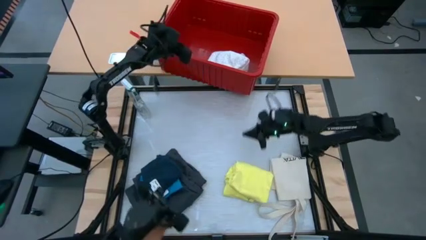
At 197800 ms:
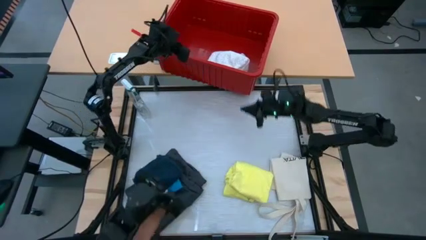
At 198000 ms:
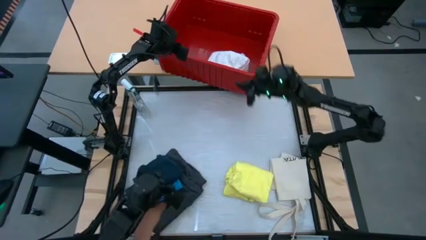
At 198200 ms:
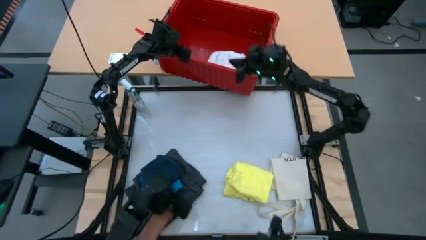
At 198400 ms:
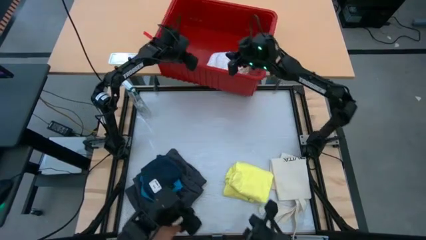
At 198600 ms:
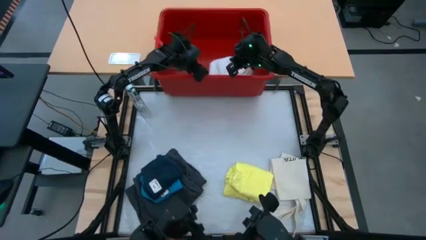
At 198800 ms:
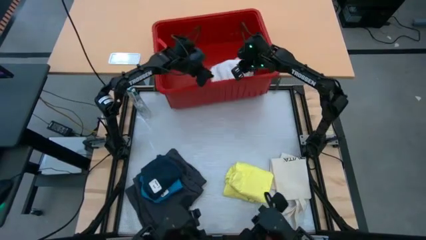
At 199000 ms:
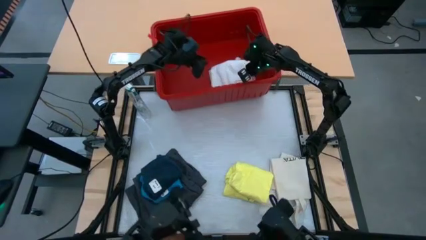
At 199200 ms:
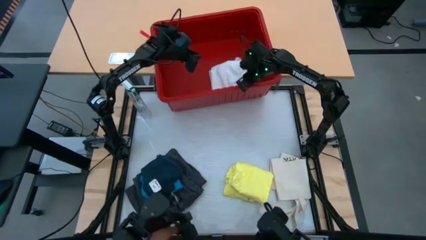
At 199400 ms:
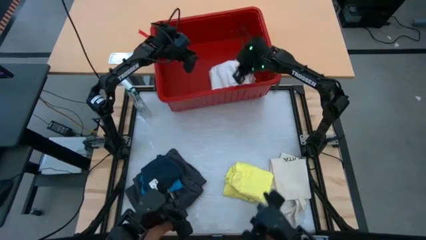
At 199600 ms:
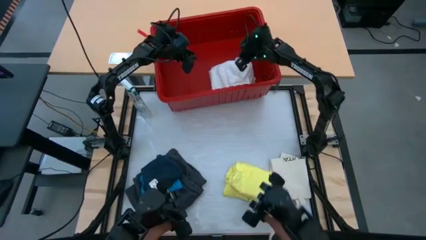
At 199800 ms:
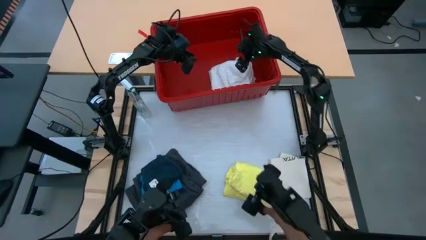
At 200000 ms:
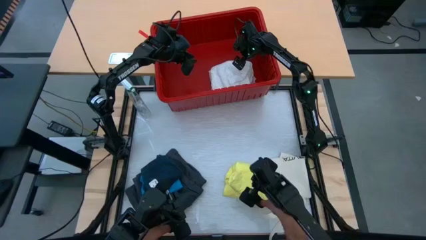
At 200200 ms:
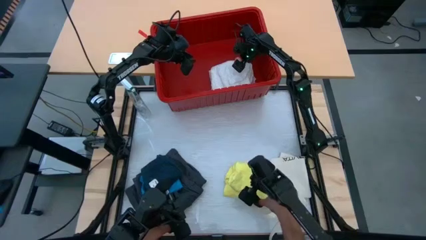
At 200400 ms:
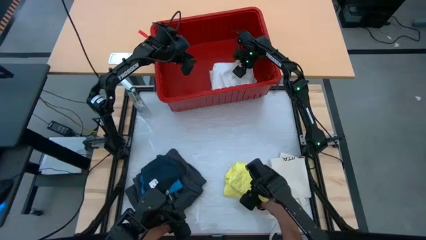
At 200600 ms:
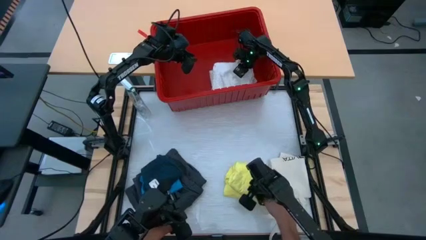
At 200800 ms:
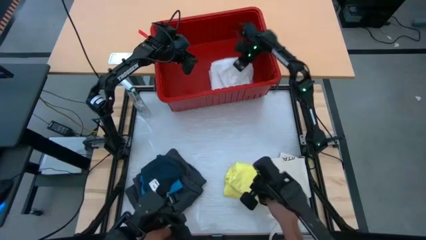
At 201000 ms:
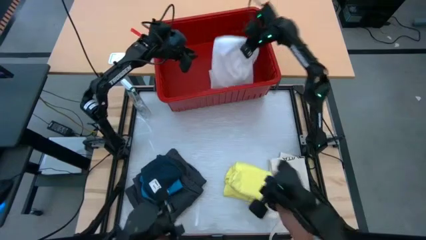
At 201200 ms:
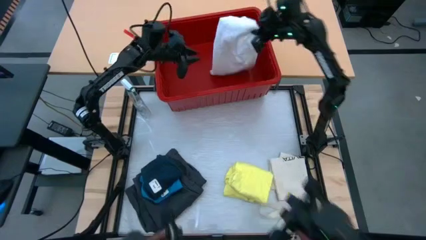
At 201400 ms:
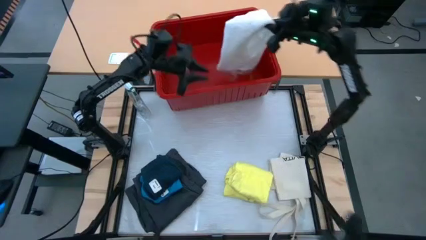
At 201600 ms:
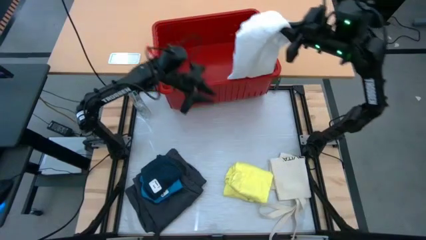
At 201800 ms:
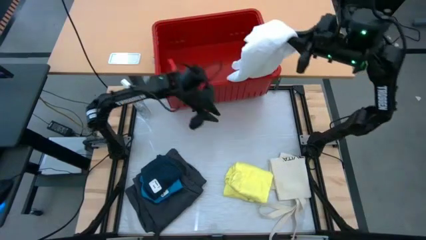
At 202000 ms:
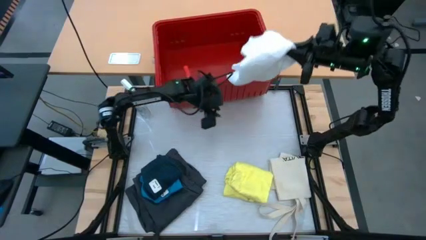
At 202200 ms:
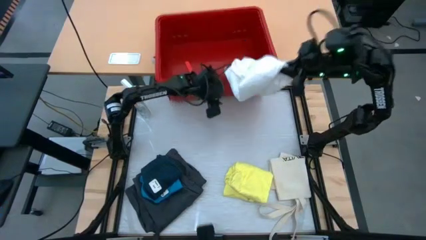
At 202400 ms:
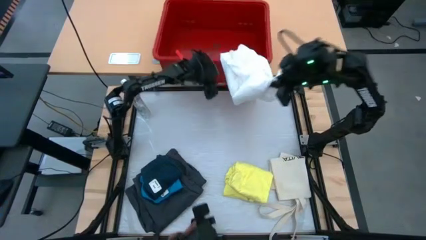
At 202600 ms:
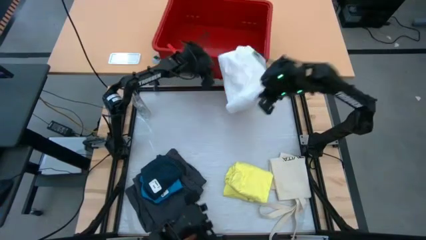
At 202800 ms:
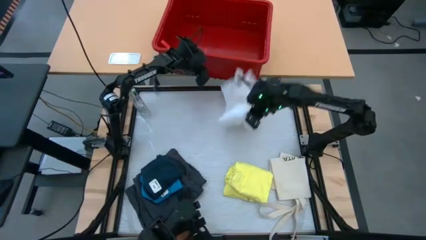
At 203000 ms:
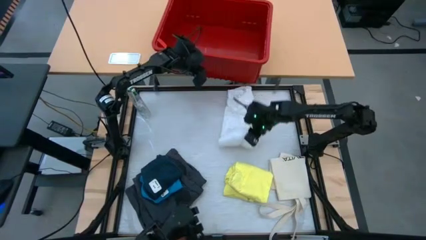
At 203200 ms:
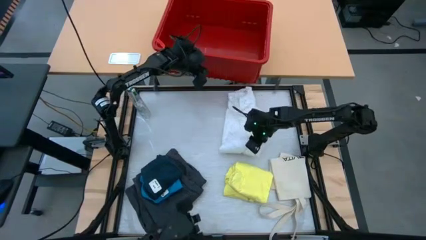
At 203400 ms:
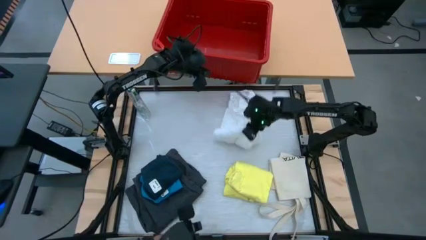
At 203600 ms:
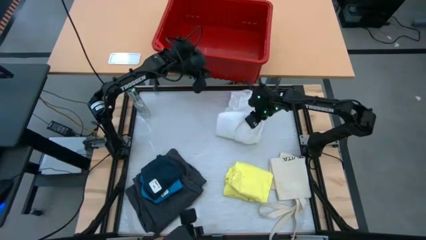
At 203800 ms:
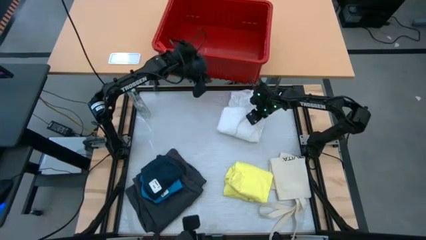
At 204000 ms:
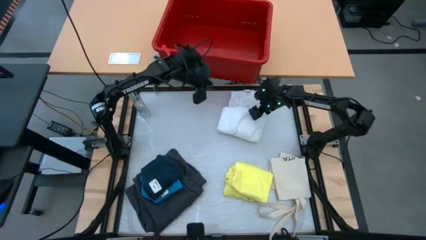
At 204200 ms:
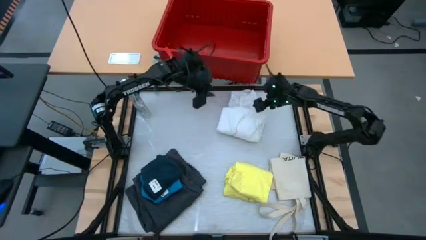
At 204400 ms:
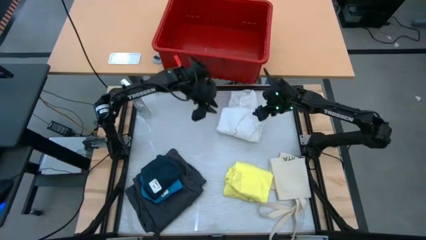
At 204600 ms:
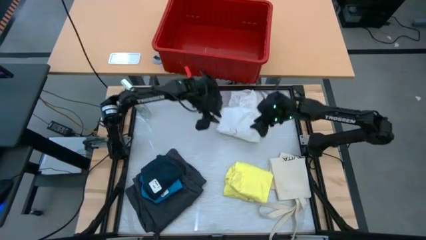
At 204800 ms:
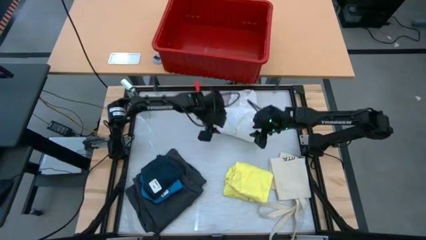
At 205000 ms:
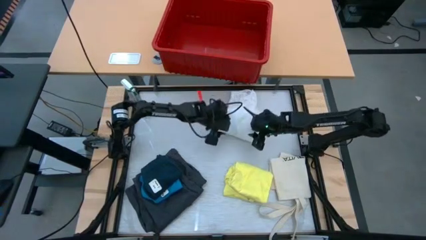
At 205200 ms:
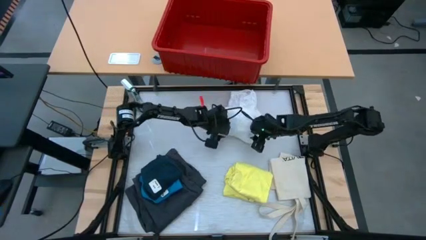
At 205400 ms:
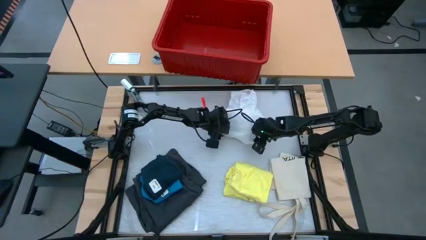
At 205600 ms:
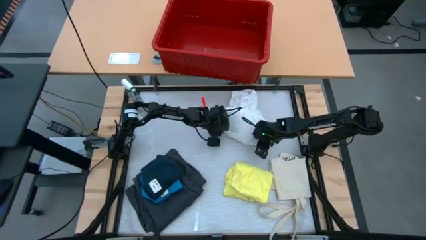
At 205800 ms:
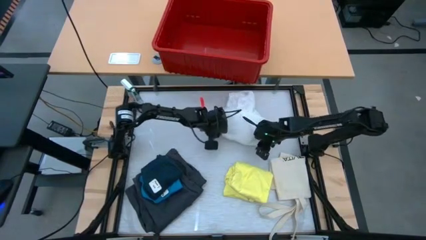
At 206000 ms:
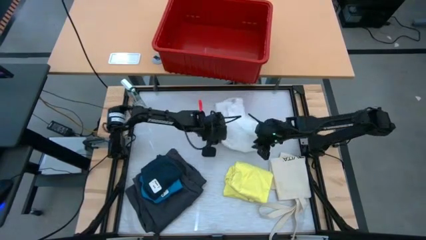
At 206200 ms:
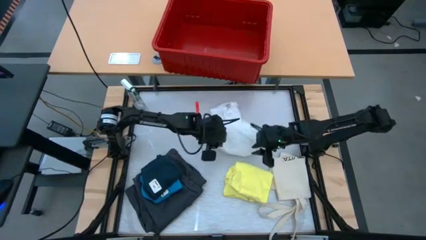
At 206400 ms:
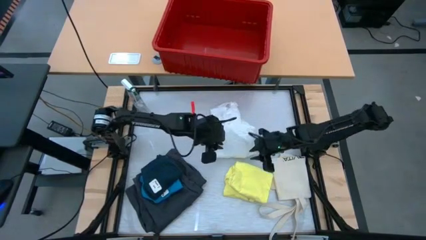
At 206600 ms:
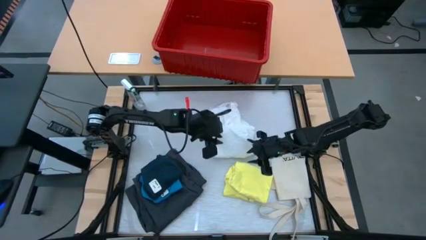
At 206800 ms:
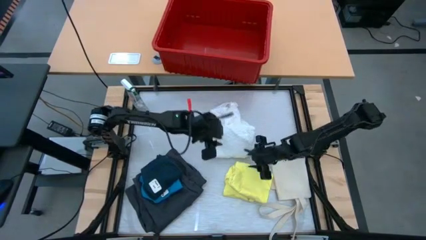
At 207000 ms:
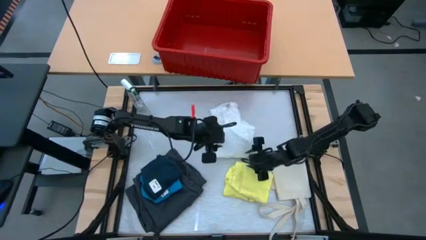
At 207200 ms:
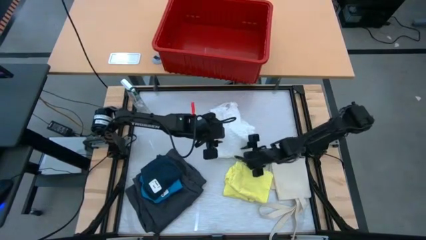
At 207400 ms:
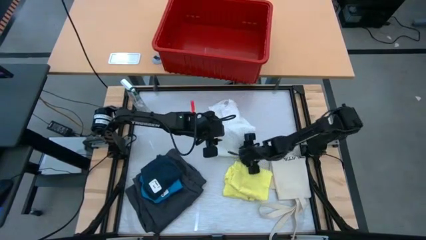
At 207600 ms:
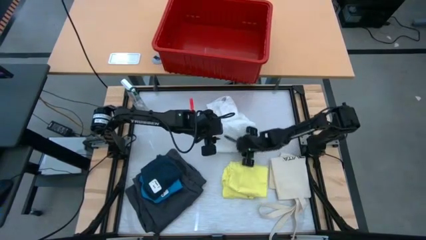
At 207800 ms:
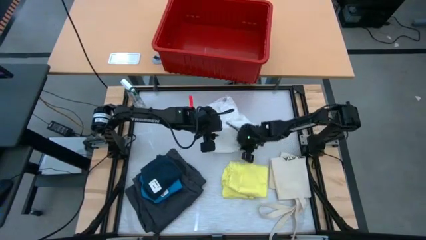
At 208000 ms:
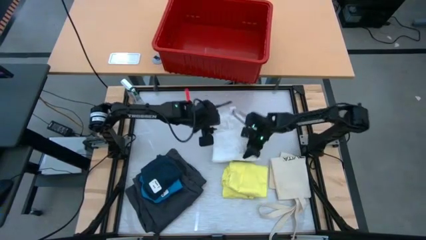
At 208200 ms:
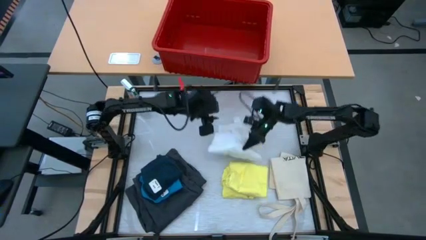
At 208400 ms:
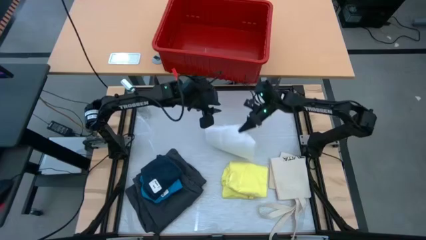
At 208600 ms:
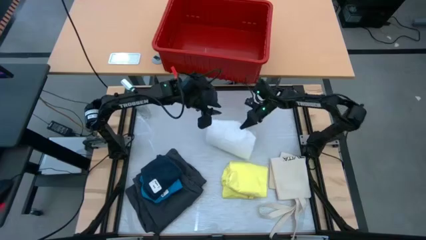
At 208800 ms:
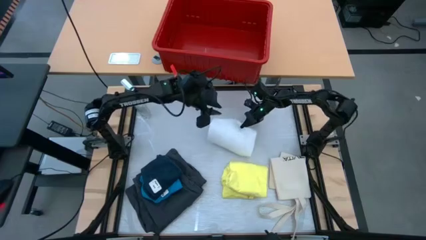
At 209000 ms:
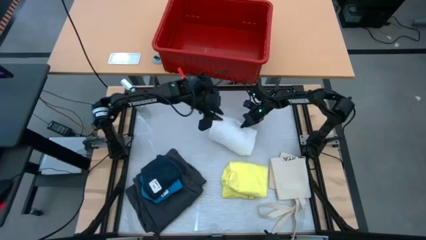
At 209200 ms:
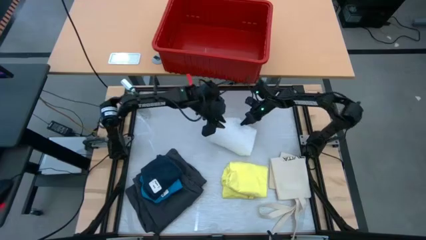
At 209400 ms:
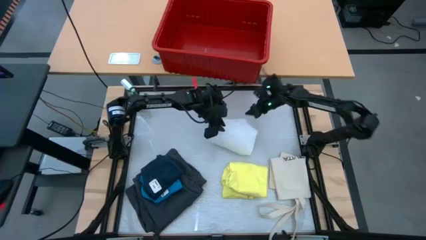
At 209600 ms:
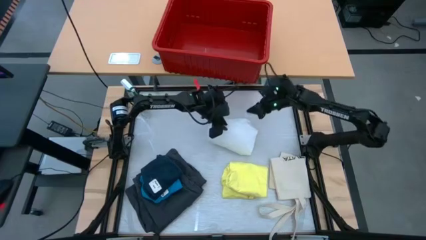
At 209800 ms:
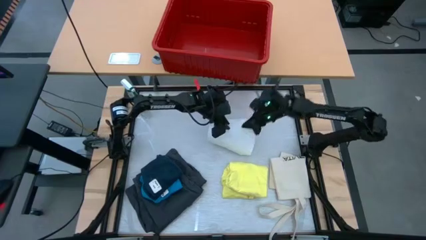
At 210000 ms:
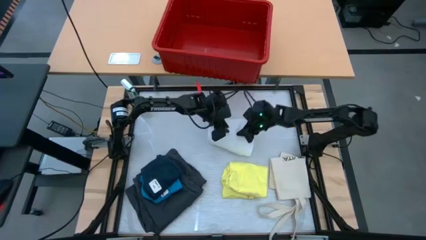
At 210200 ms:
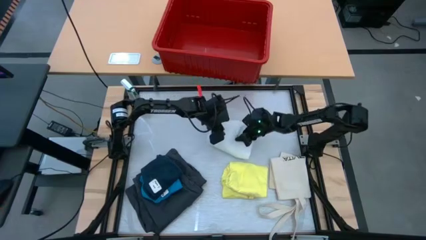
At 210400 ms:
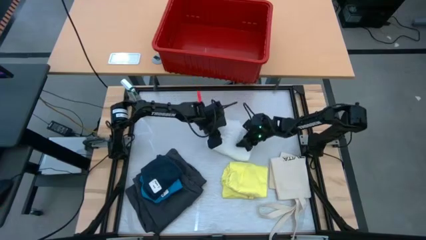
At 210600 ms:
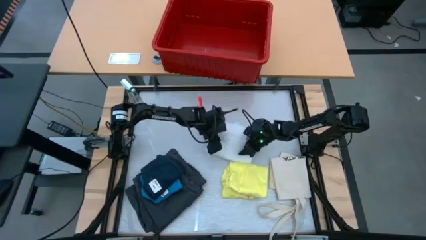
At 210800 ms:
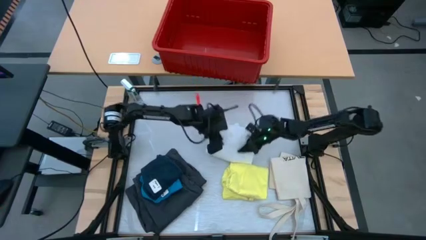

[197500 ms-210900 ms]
Task: Fold laundry
Fold the white blouse

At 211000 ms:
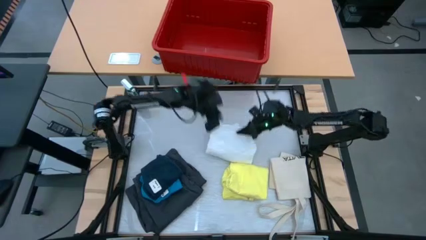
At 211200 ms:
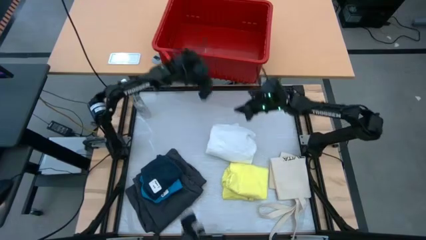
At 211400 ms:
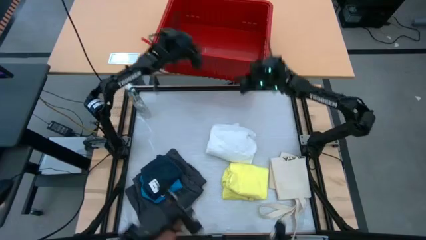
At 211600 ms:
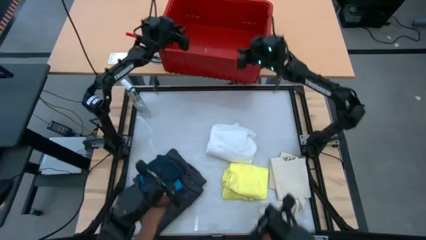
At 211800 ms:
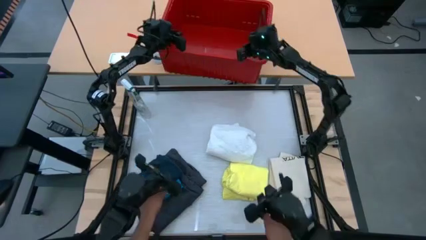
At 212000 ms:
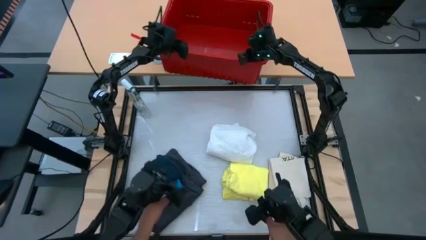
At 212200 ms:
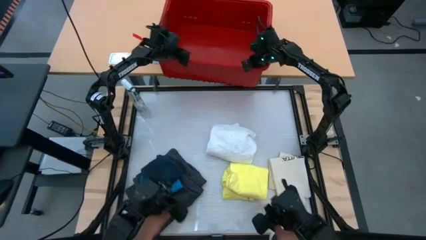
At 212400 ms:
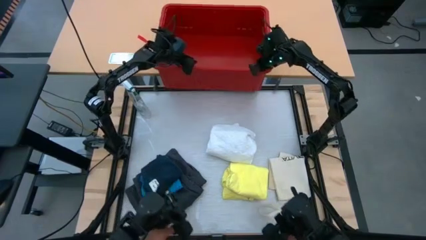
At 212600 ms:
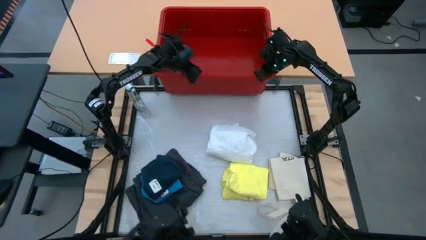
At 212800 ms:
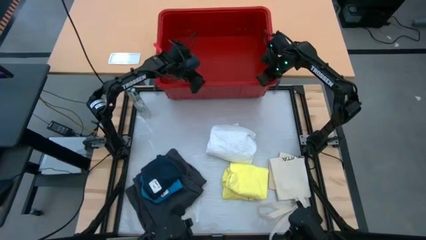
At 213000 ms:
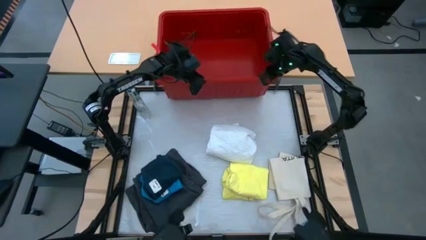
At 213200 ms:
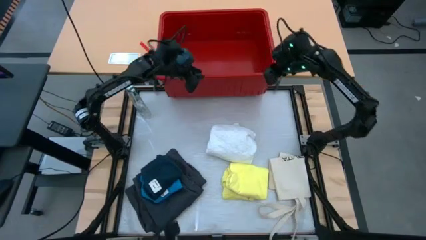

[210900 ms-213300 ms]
Adjust the red laundry bin
